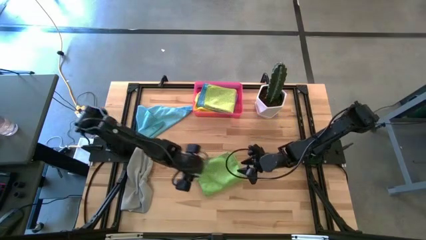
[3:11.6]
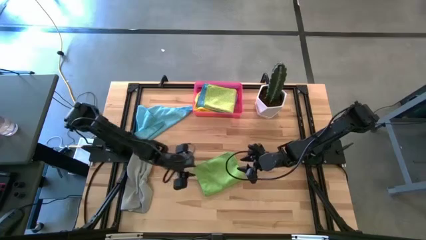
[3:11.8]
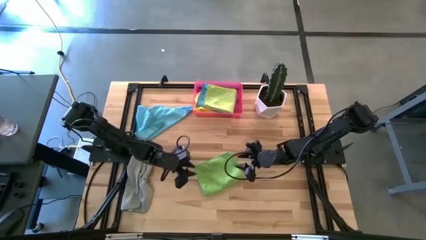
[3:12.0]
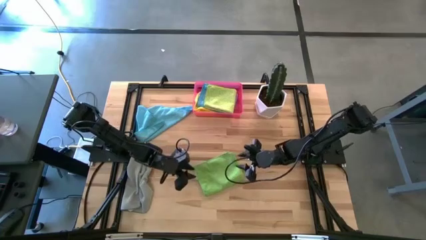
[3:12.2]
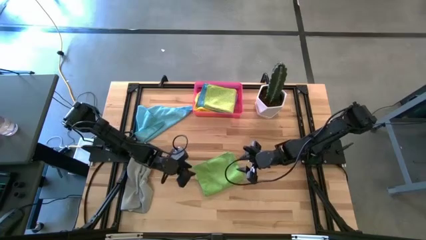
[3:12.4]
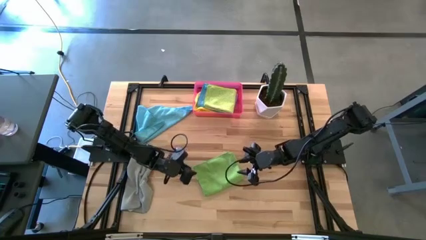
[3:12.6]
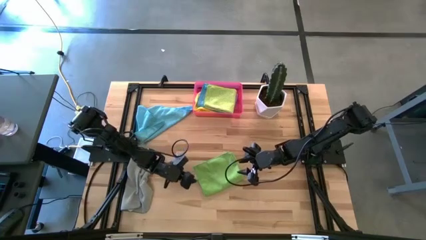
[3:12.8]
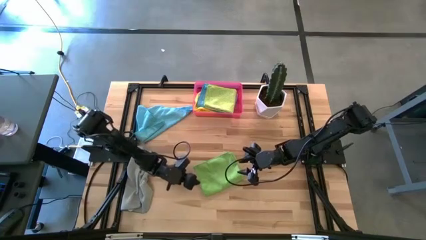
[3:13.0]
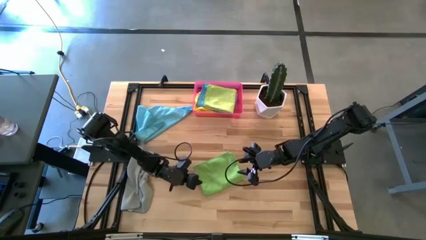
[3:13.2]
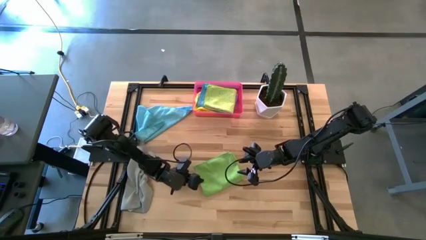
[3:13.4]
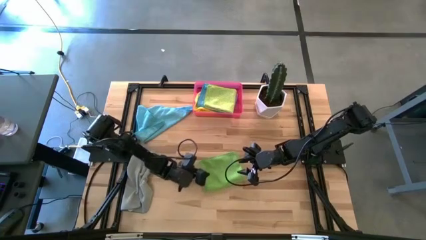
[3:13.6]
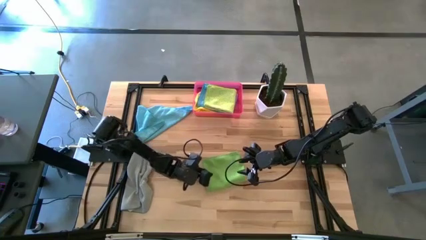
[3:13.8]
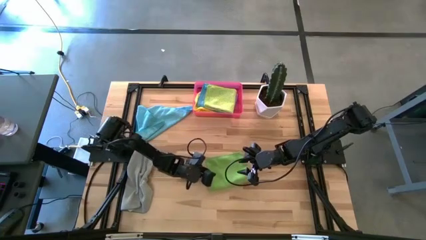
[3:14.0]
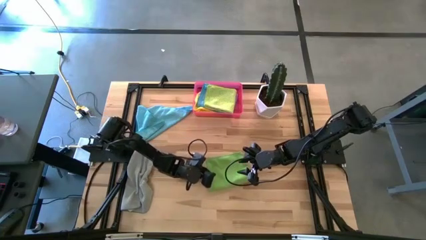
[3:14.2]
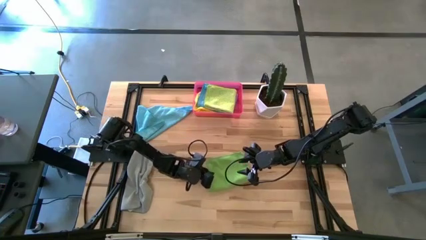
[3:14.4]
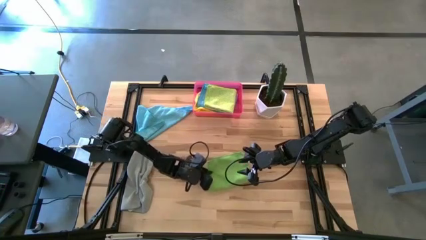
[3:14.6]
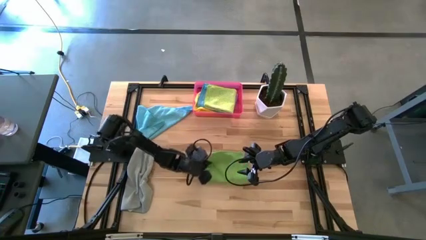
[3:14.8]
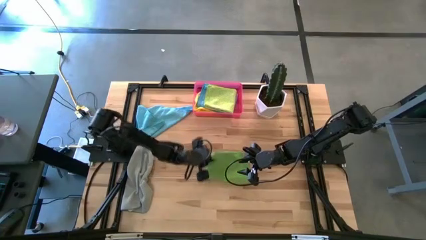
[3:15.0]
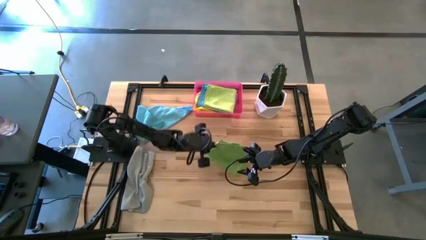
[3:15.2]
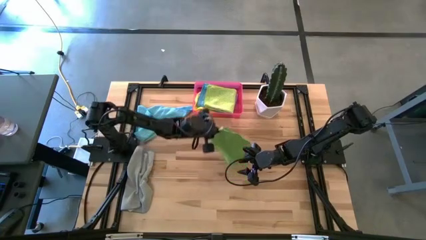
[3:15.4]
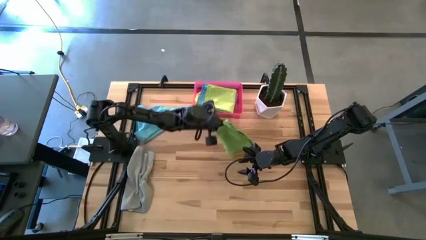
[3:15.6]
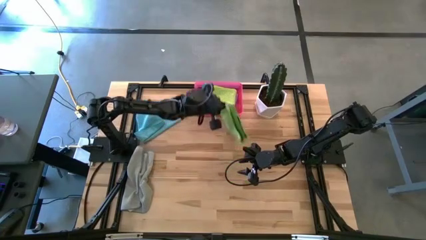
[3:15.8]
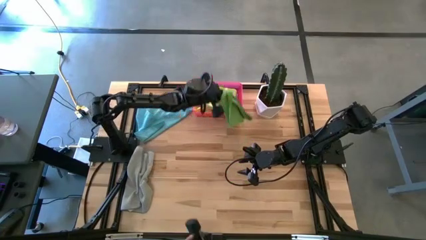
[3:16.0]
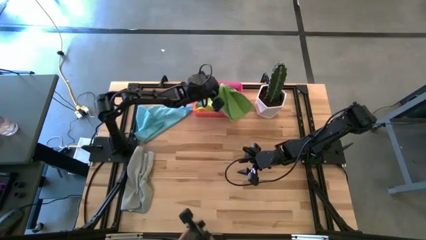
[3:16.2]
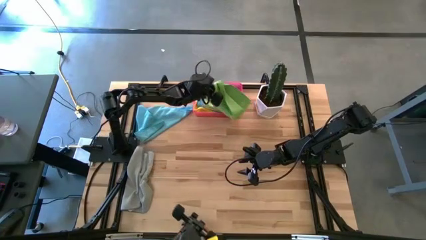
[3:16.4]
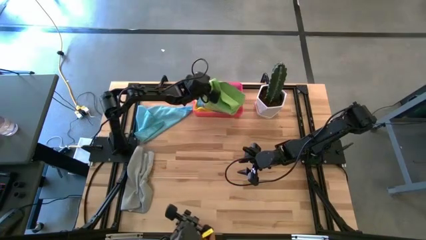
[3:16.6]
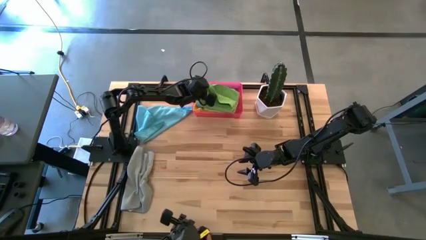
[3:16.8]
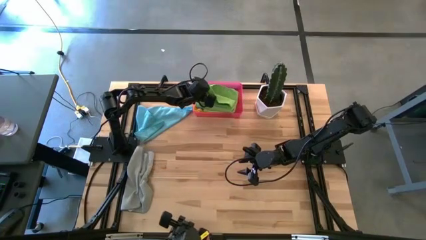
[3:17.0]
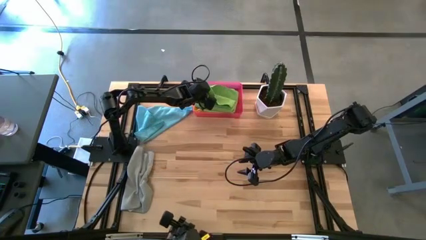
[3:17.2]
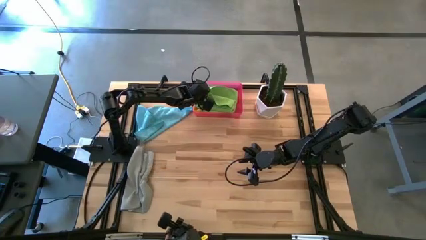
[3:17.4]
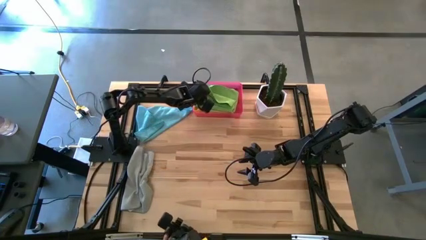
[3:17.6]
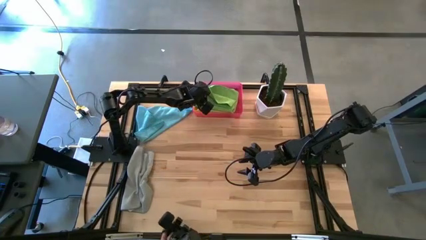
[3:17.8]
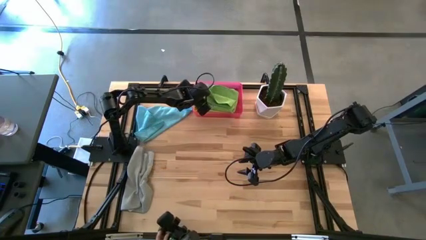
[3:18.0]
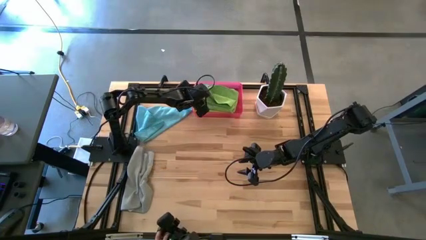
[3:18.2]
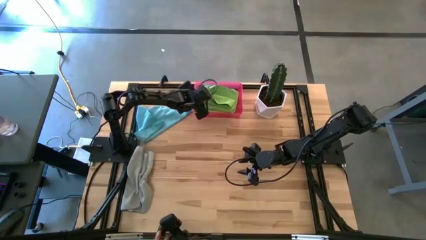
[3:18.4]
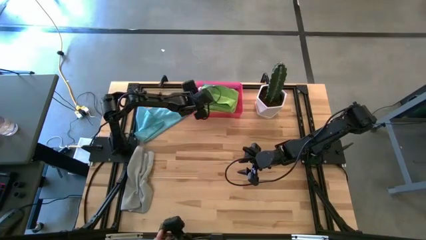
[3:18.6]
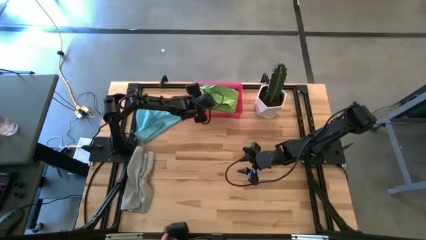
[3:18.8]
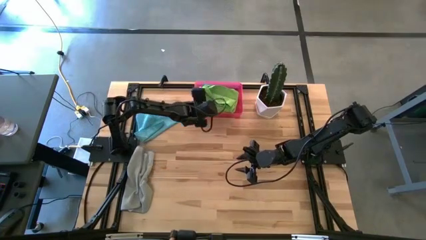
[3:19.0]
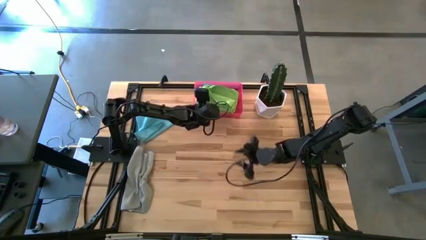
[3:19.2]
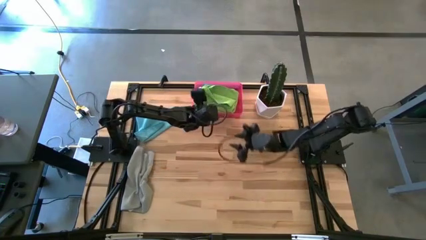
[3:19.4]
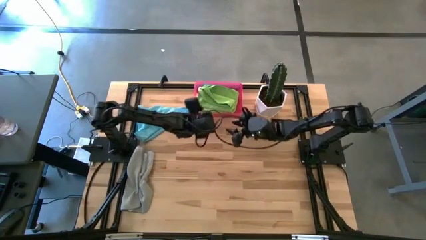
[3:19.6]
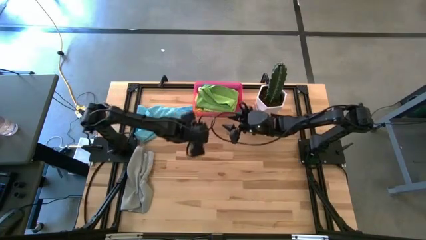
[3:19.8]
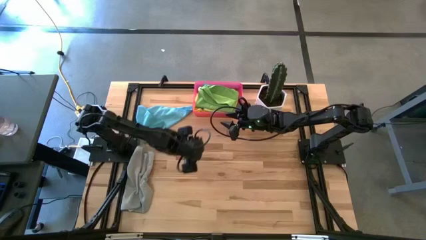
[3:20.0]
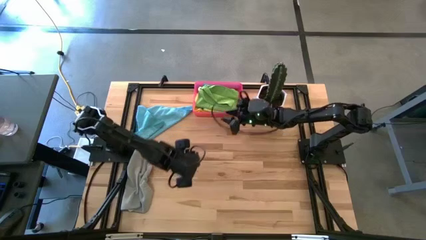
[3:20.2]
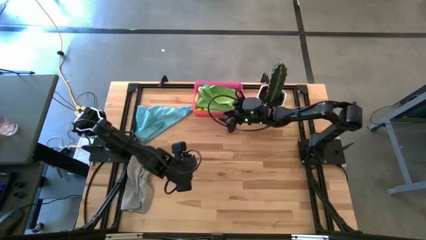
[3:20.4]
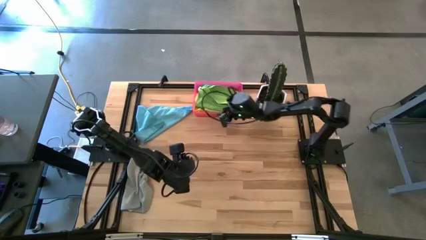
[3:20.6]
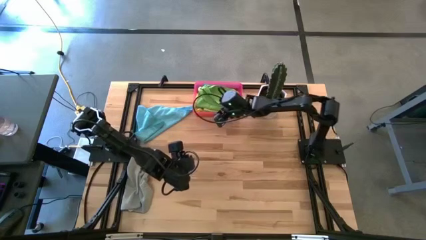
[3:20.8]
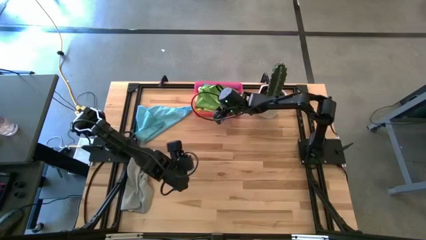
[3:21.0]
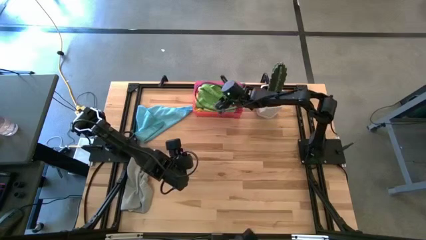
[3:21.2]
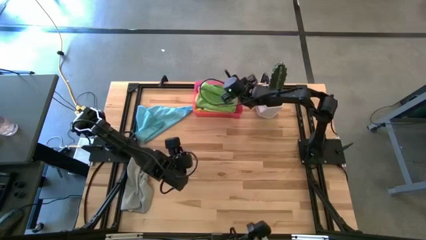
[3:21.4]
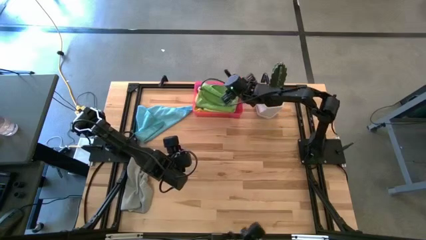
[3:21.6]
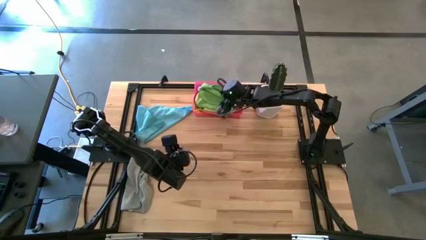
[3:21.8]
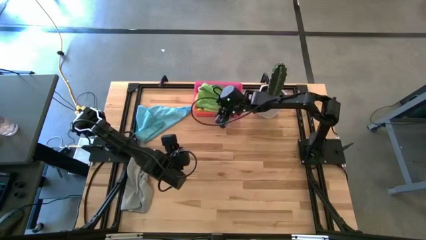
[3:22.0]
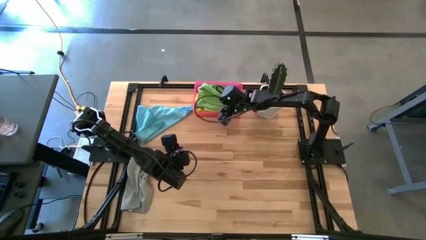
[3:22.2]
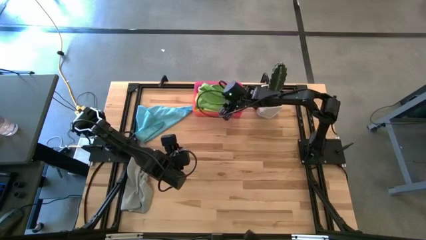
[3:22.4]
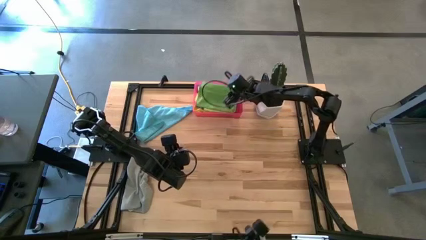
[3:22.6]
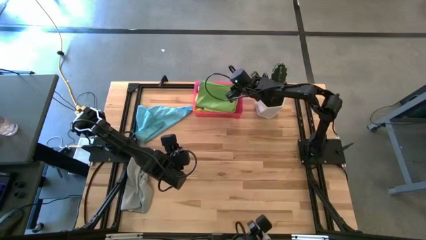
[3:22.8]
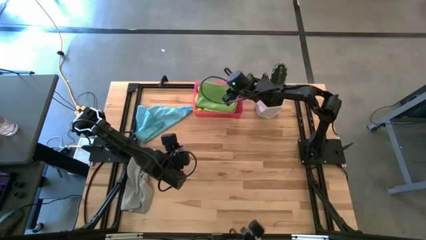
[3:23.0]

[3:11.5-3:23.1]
Task: Fold microfiber towels
Put the green microfiber cloth into the pink bin

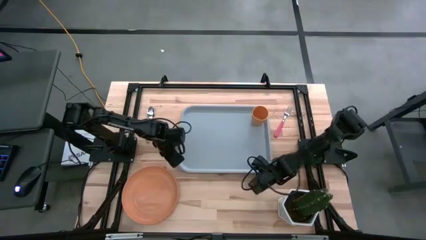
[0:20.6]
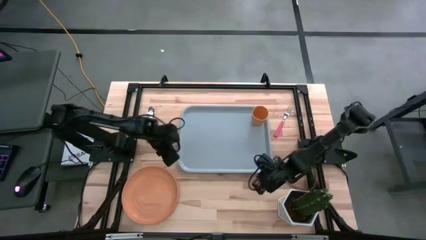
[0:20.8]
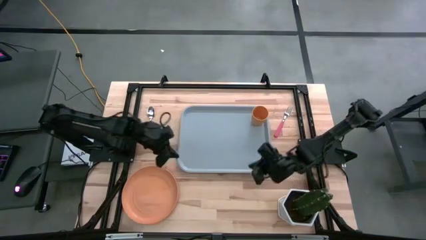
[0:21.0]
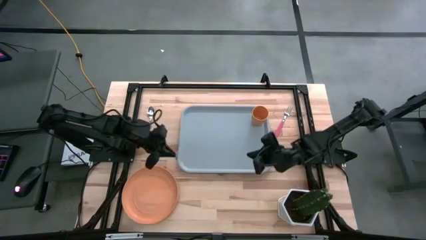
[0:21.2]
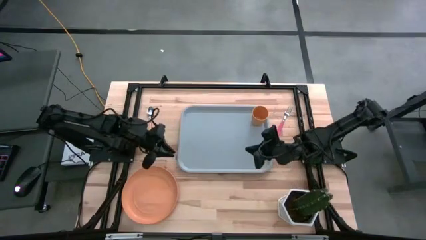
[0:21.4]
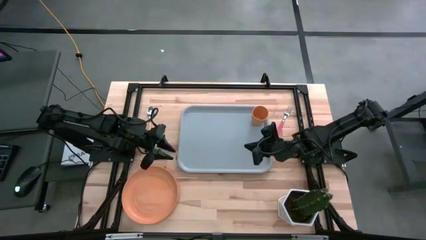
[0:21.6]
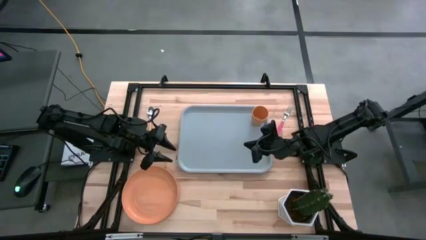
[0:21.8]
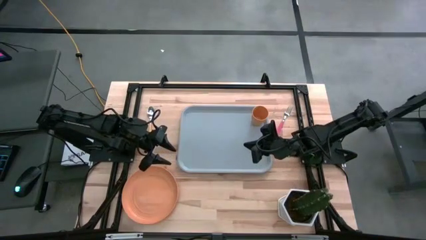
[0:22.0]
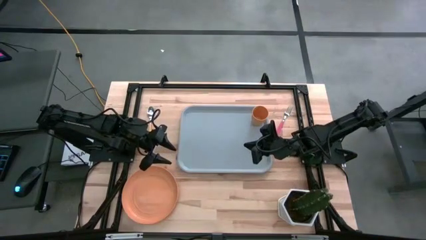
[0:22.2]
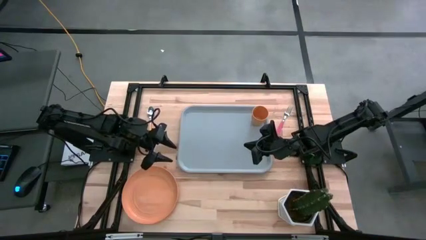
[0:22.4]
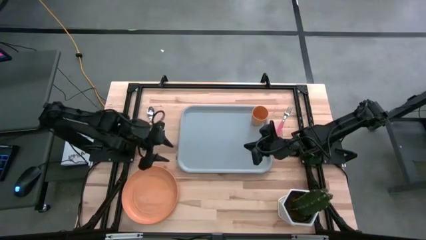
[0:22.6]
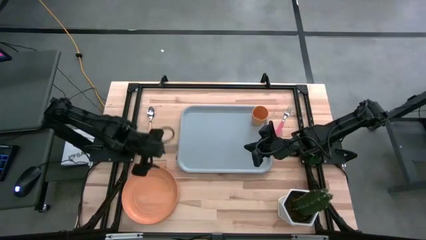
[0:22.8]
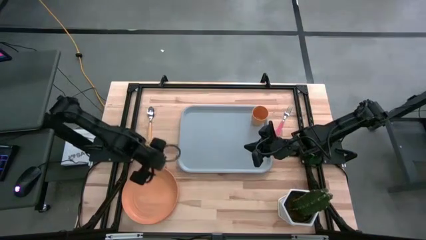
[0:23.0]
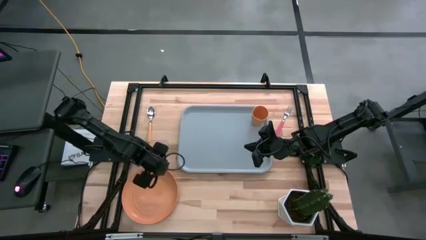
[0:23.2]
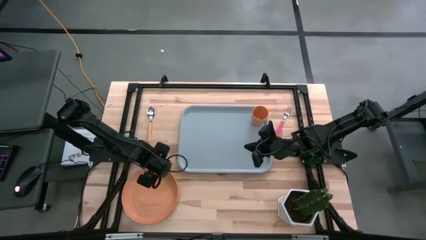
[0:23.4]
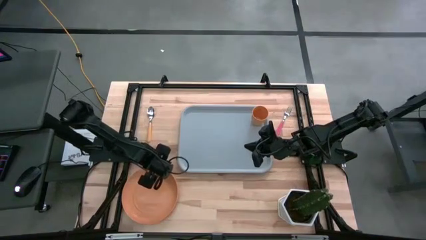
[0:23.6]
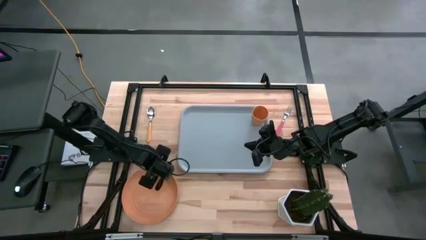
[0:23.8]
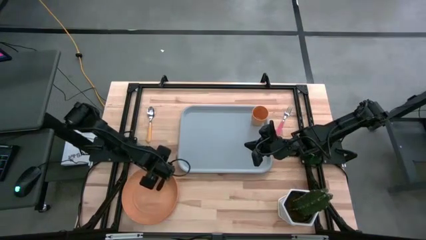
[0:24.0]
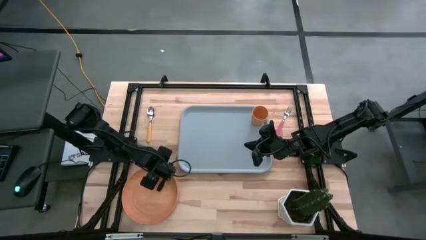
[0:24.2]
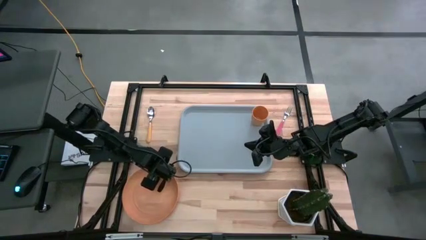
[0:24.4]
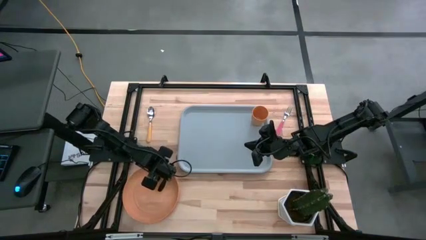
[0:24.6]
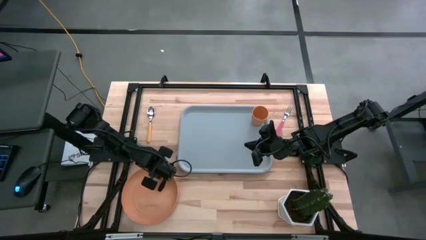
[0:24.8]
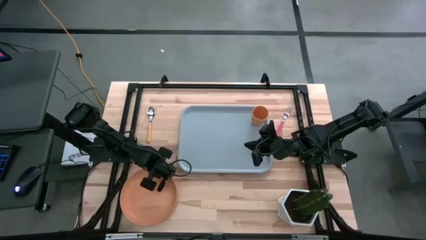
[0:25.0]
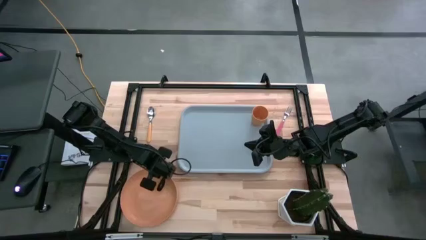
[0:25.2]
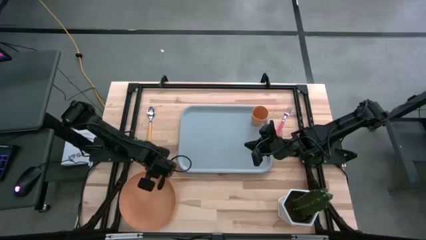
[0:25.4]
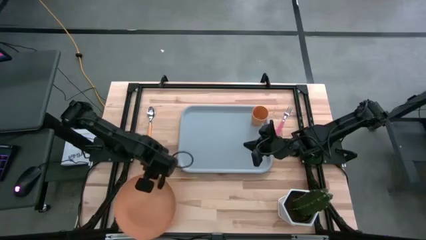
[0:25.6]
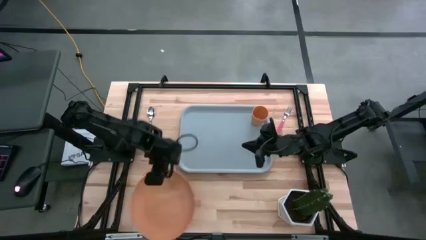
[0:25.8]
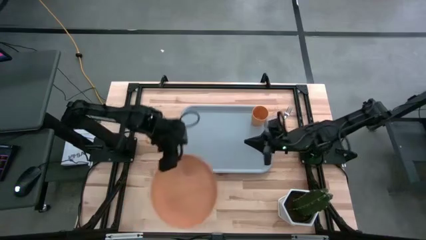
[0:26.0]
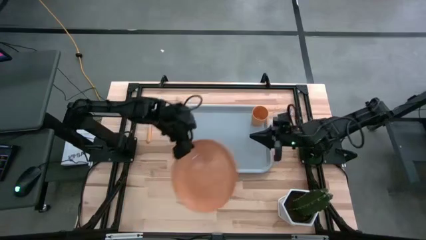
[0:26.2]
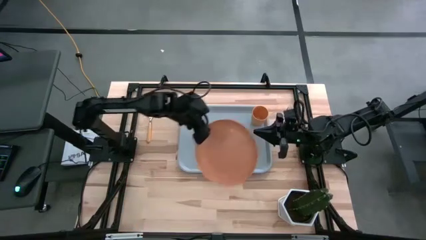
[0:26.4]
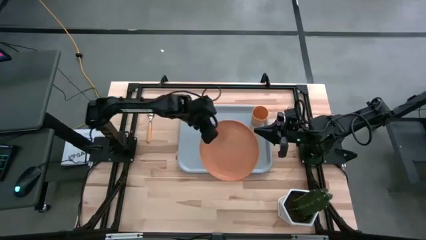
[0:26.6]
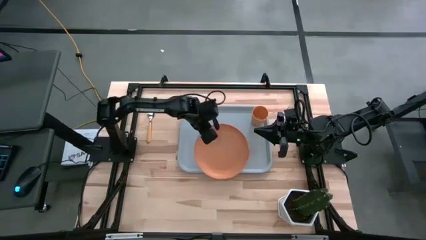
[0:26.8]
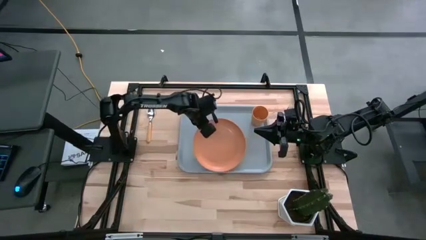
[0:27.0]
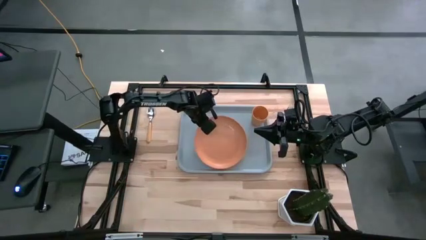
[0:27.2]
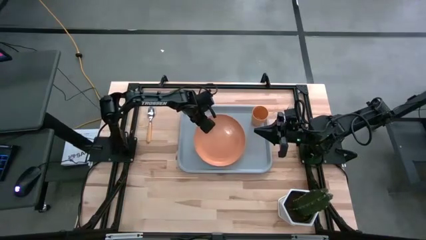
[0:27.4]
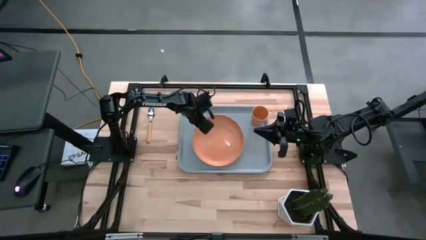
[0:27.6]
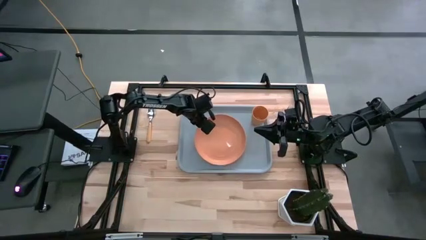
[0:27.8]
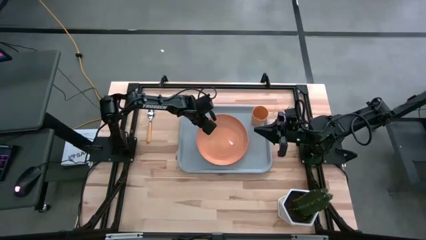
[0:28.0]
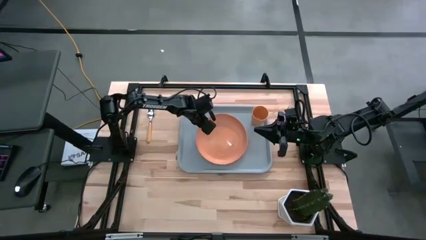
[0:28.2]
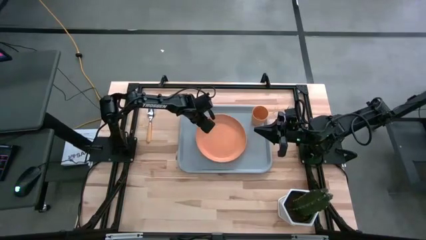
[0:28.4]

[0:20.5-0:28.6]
Task: Pick and place plate/cup/fork/spoon on tray
Put the orange plate on the gray tray
